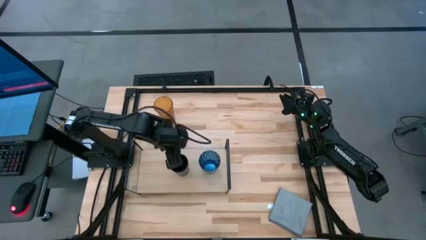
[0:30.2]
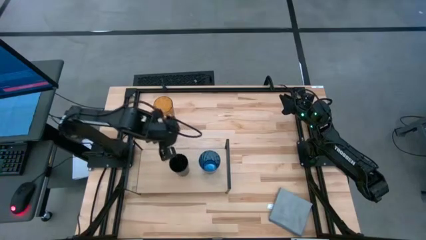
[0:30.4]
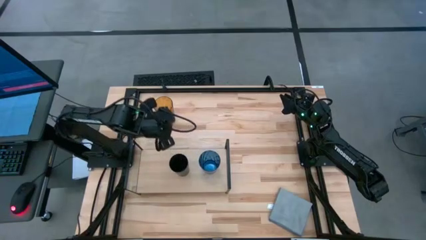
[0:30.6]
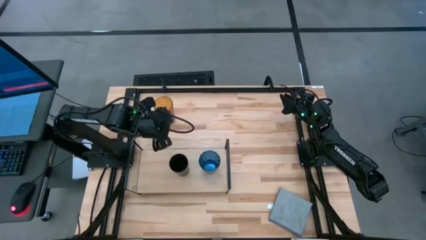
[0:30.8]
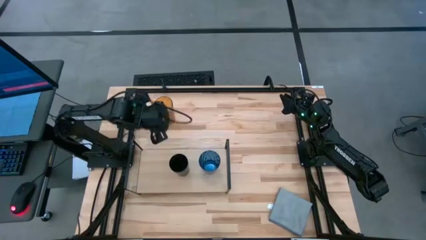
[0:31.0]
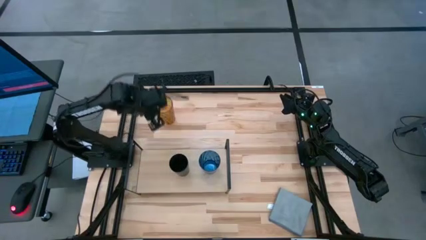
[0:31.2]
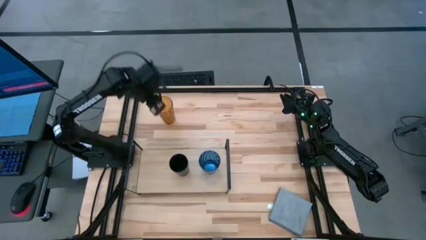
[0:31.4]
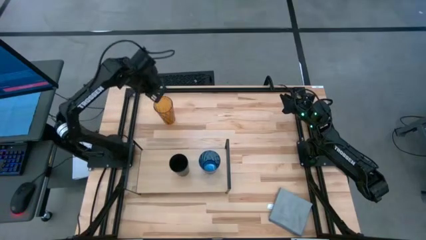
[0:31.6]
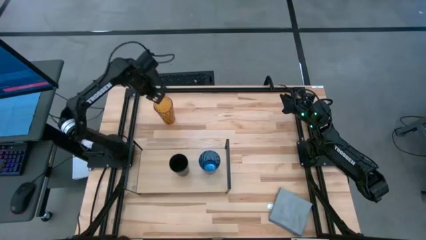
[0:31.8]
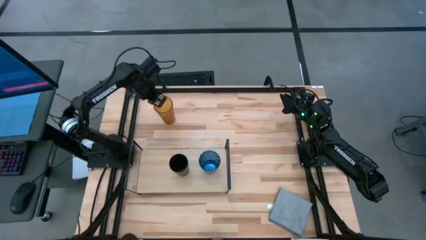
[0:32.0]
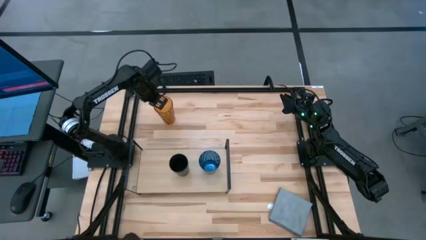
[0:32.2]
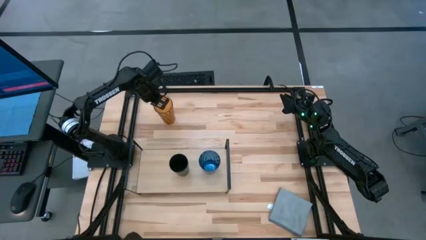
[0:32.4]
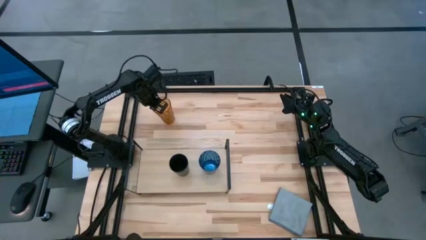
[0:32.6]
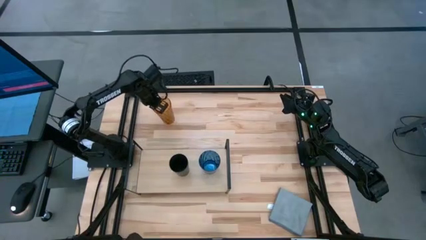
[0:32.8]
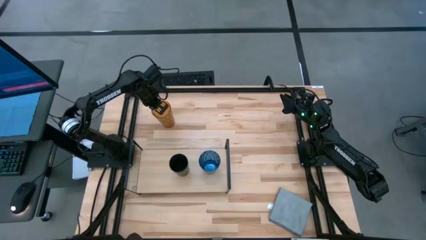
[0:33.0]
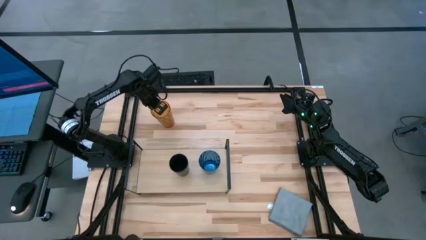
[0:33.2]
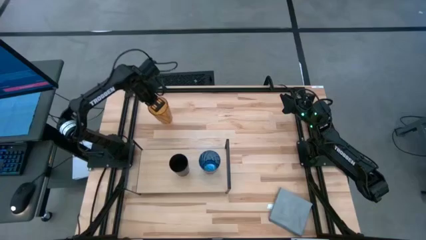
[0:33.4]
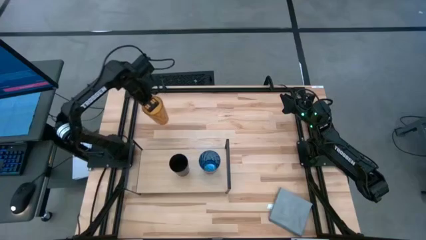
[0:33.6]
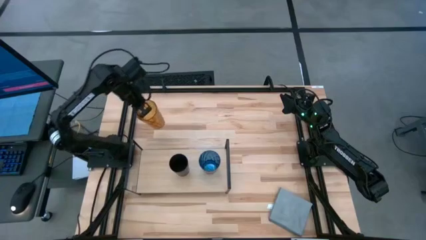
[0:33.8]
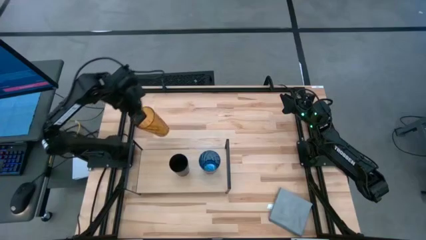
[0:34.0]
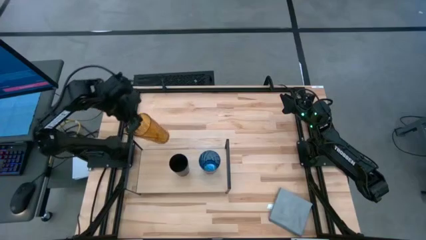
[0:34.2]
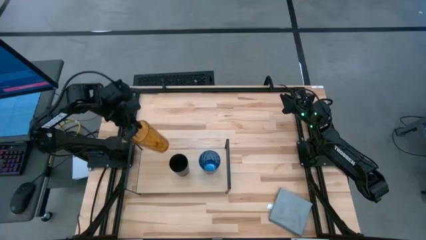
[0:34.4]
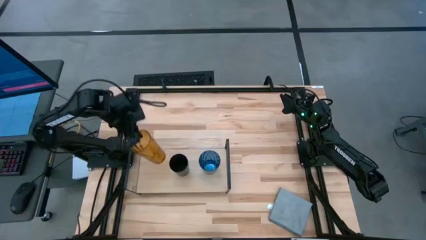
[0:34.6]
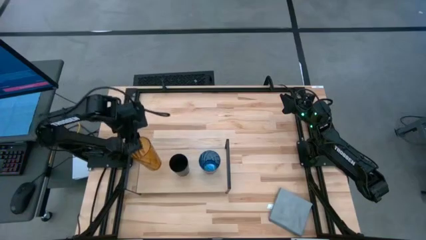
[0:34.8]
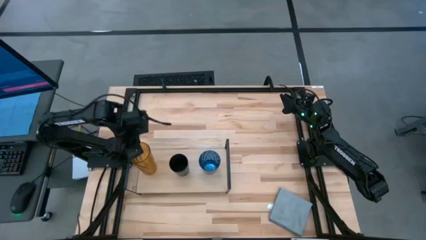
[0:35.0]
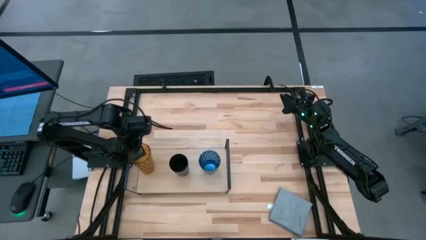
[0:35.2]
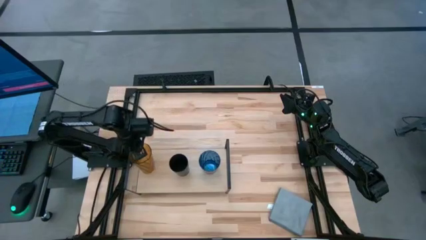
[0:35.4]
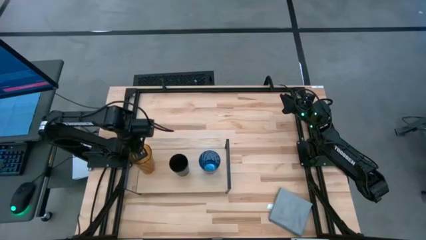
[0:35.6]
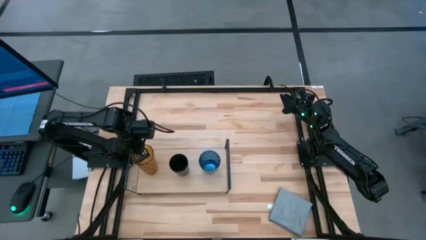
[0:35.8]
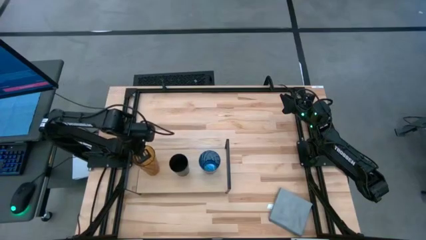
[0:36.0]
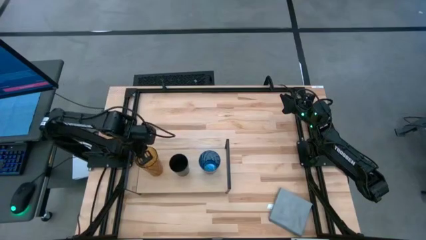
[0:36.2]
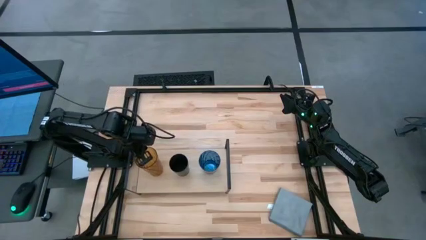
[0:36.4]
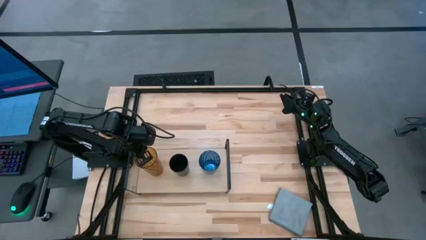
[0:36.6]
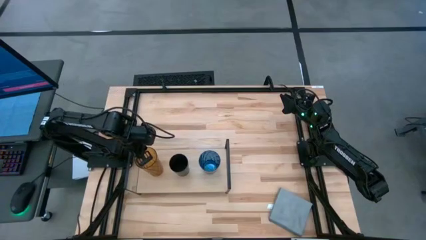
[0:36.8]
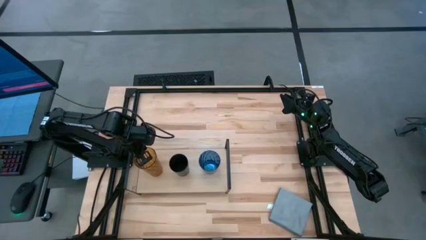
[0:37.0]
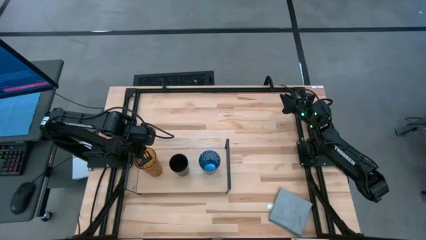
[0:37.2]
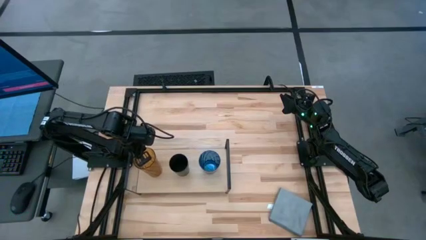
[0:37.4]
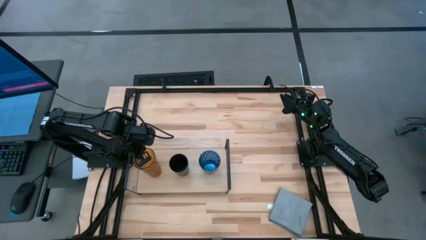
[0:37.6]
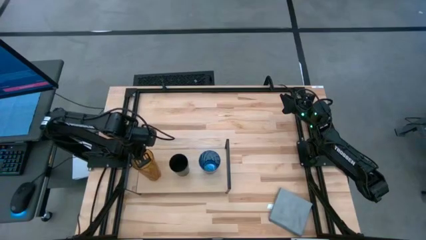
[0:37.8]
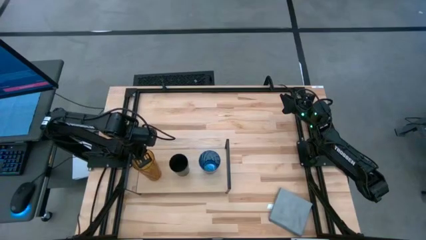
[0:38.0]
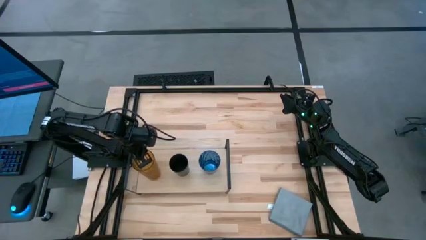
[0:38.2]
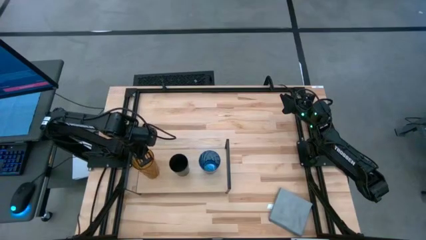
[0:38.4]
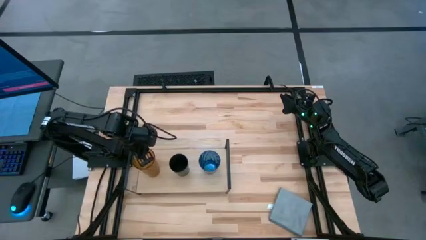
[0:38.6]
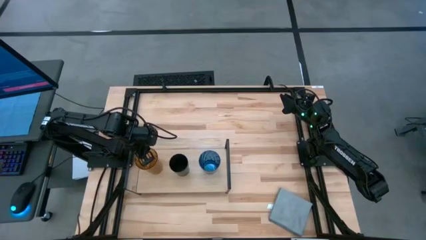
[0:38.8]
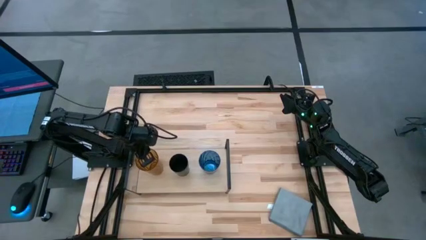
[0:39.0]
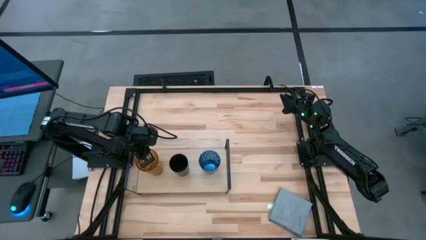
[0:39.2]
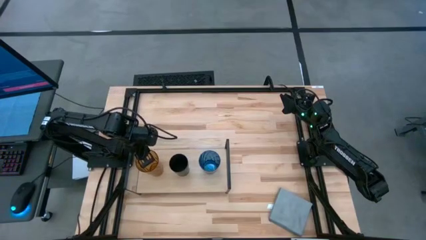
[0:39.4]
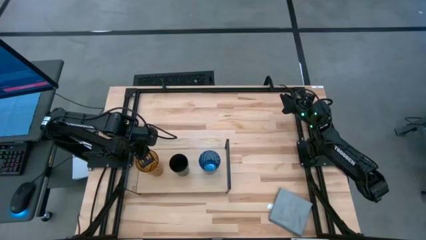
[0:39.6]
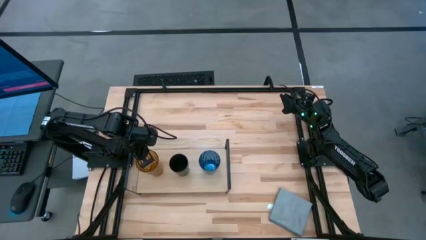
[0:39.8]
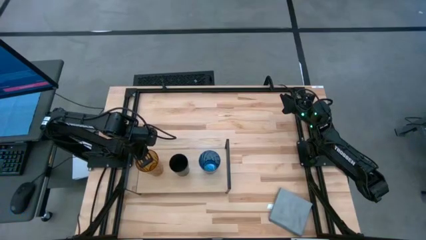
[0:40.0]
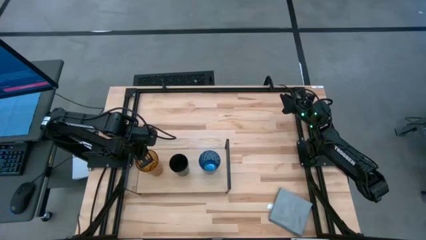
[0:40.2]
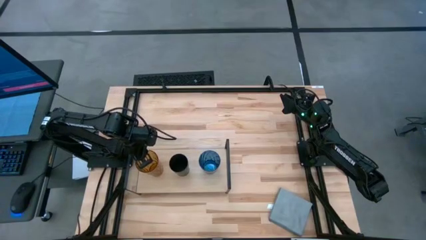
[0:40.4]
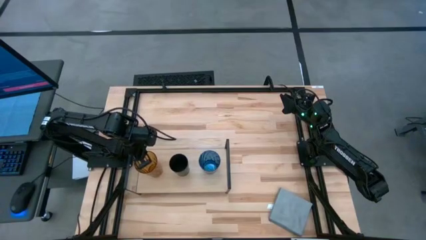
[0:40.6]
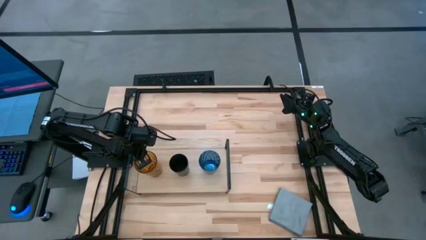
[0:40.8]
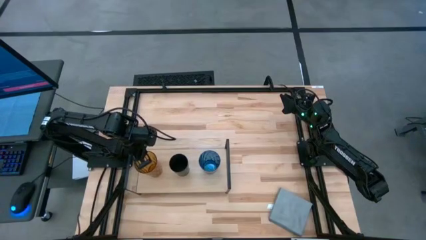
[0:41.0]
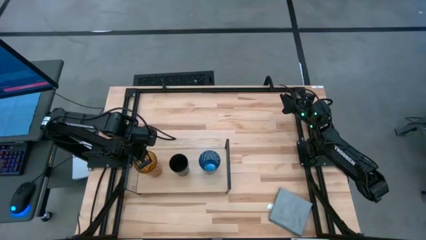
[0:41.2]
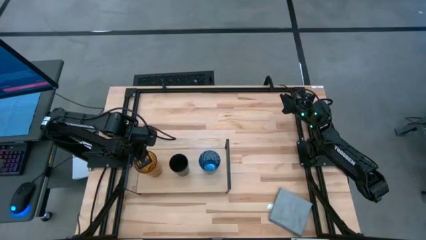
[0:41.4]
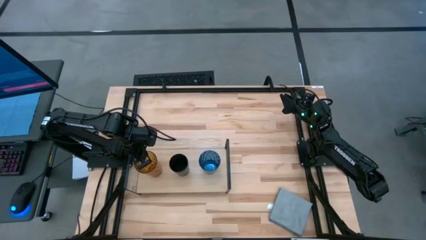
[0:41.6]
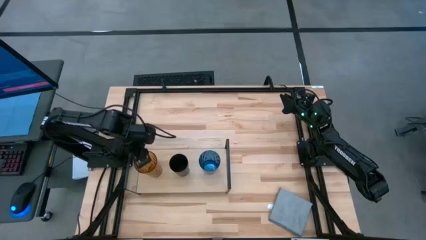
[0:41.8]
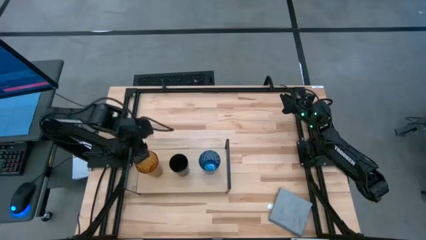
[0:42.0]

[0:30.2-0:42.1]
Task: Stack small to large cups/mugs on shelf
Put the yellow cup on the shelf
